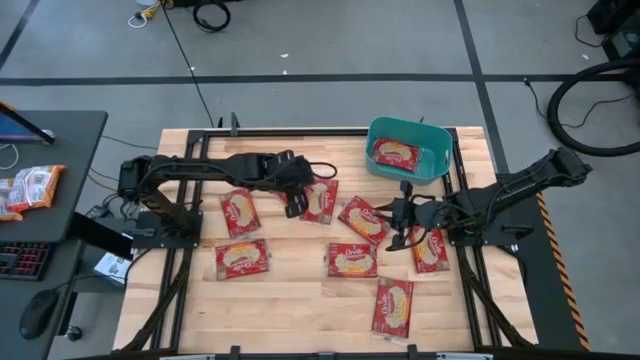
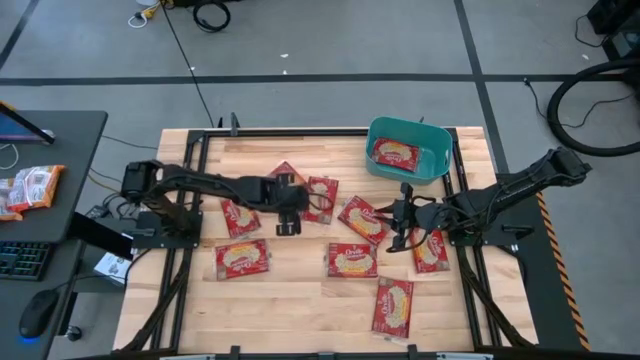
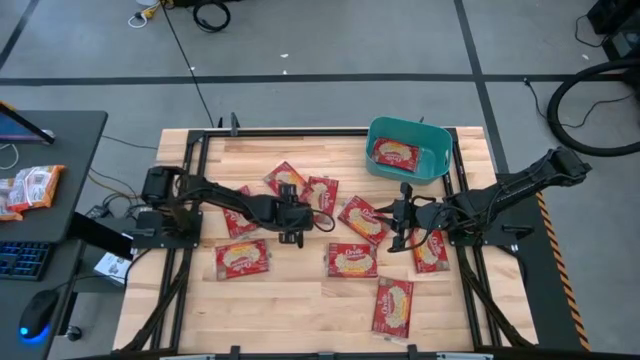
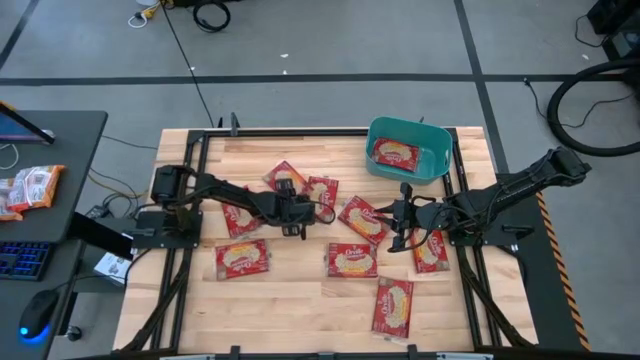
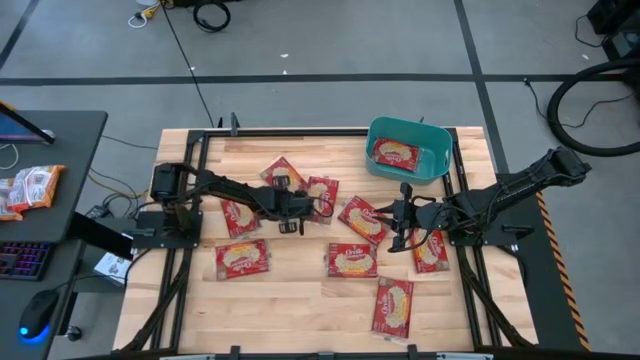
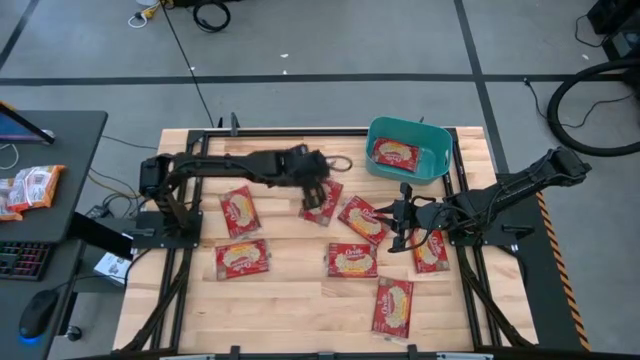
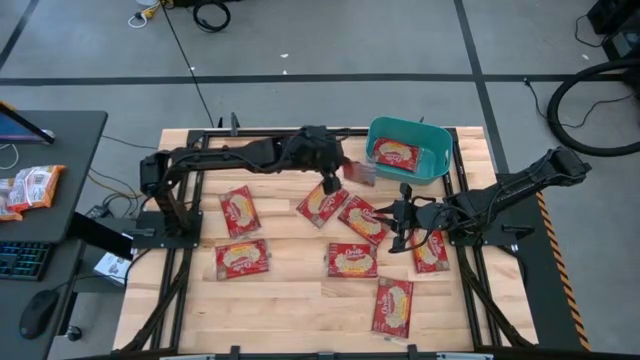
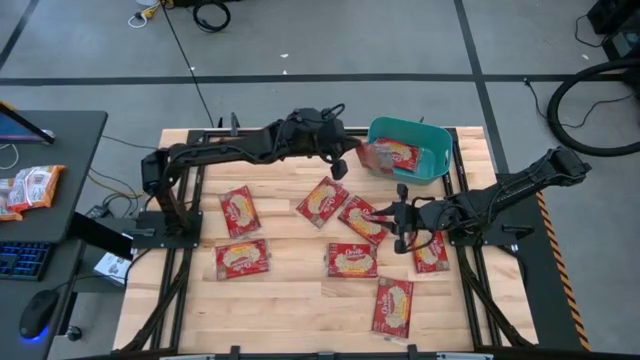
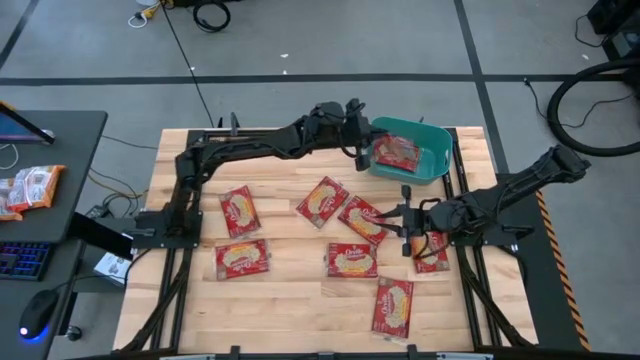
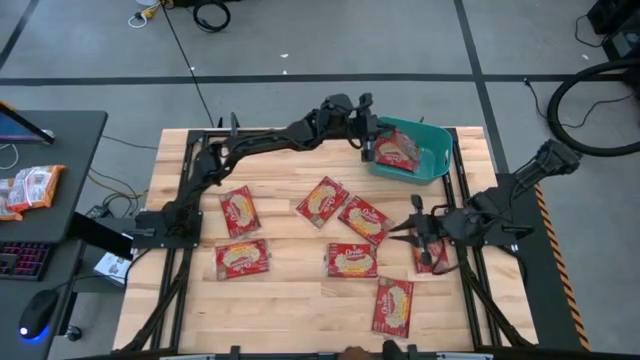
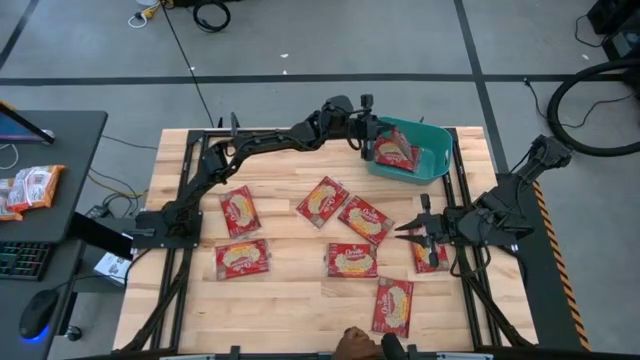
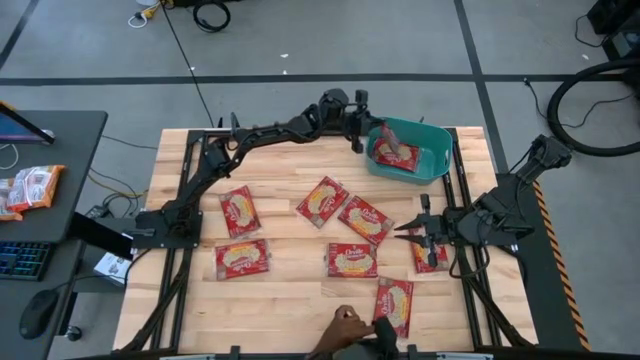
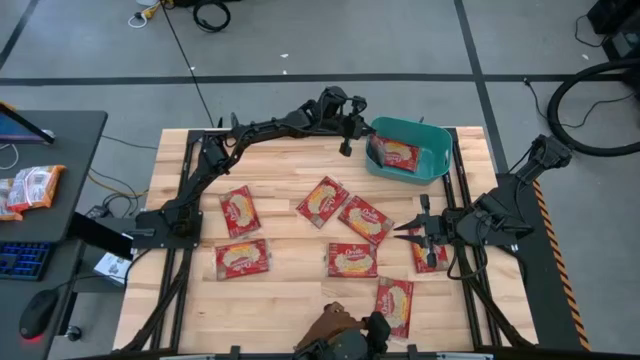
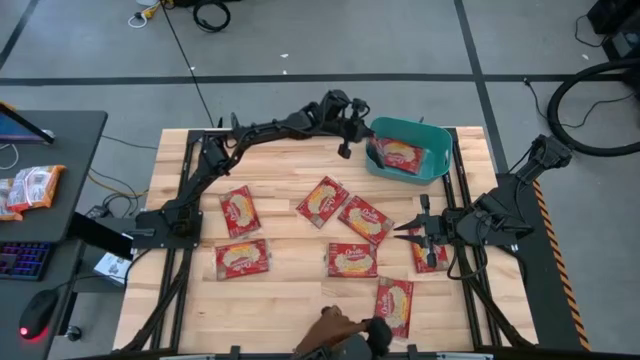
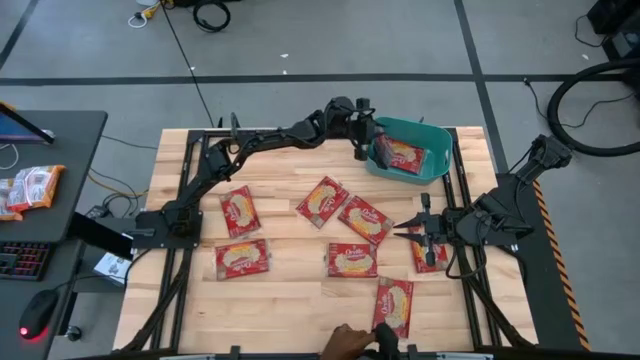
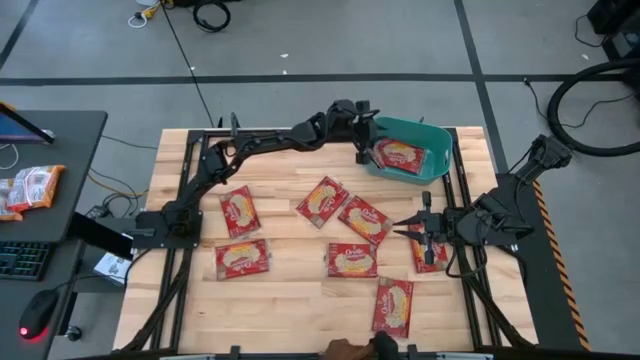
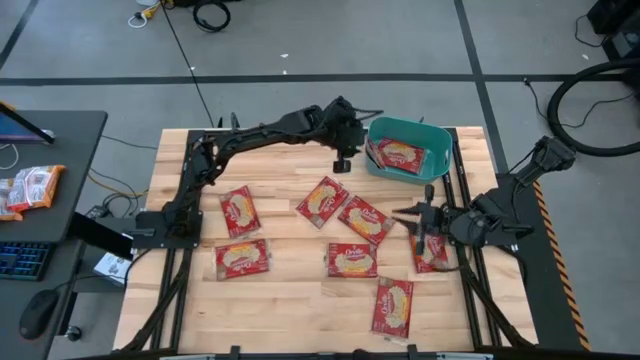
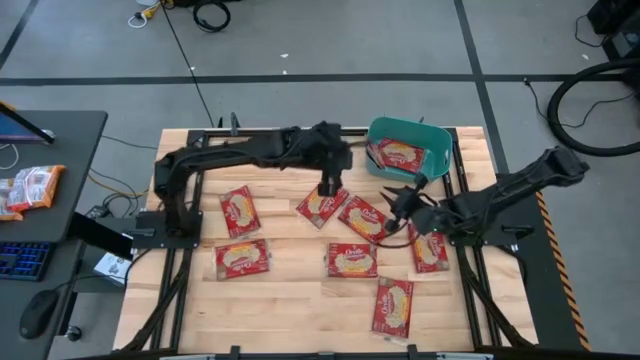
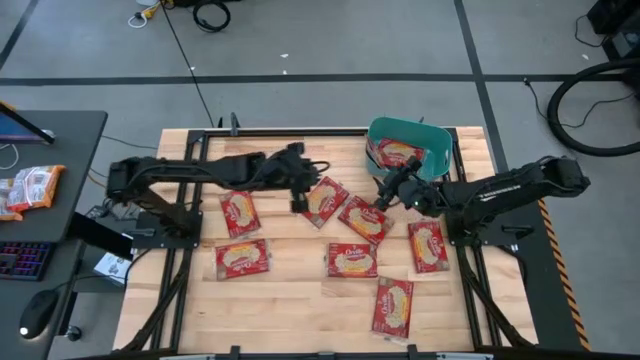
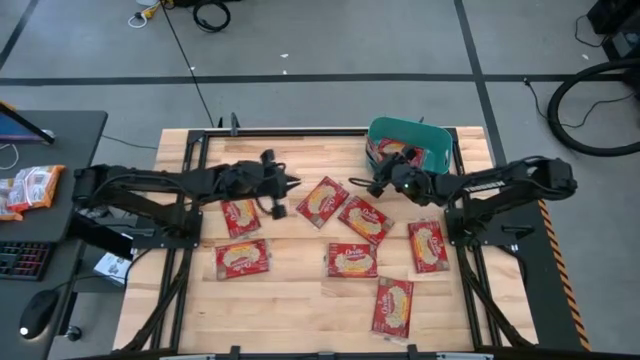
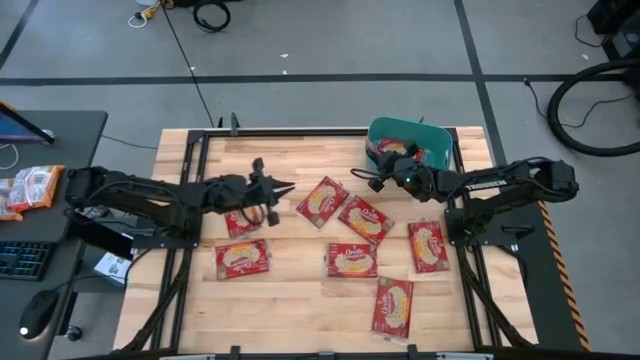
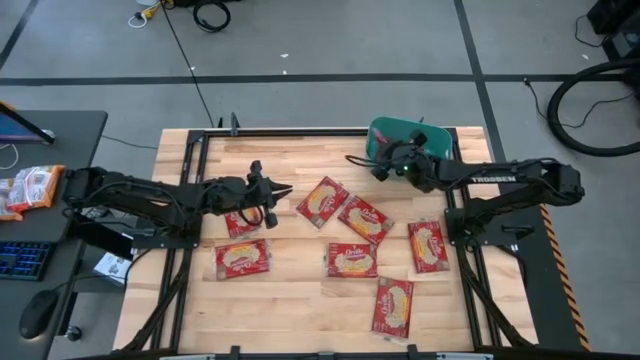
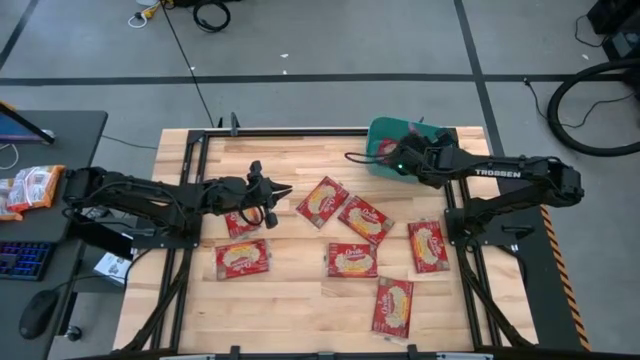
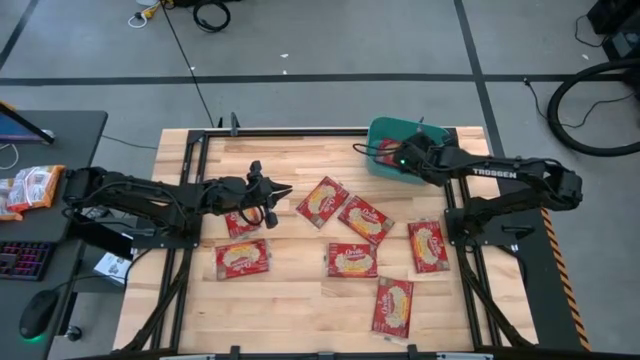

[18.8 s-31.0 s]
Task: Sort popcorn bags into baskets
Put the popcorn bag into the blue bin

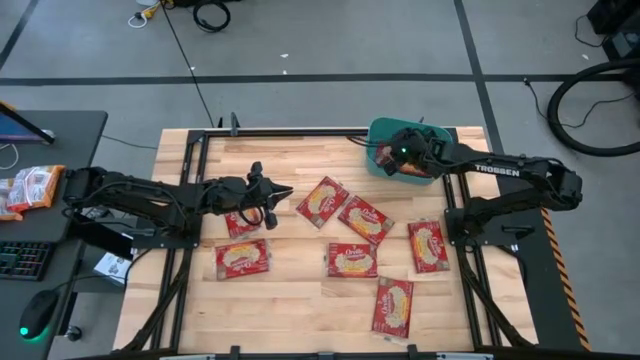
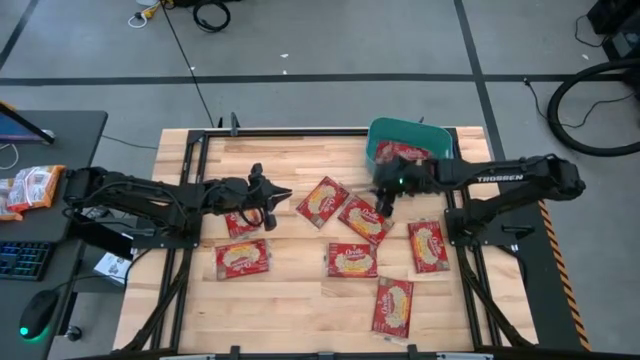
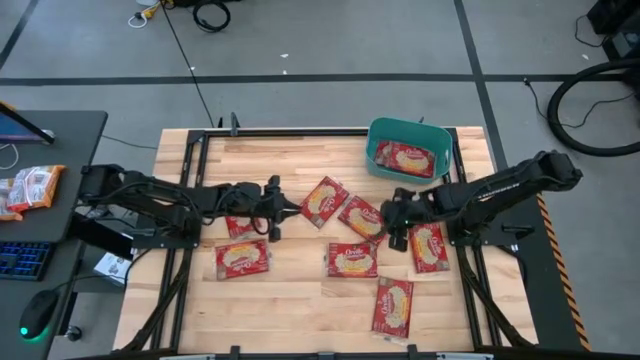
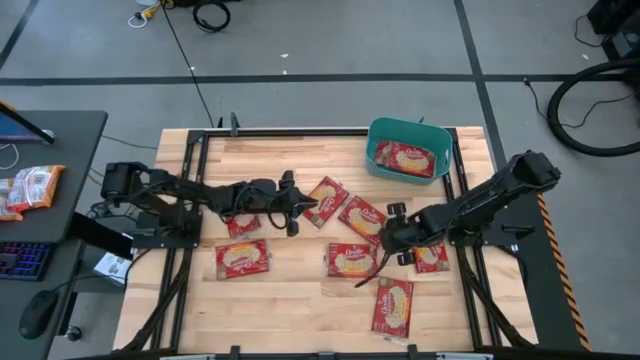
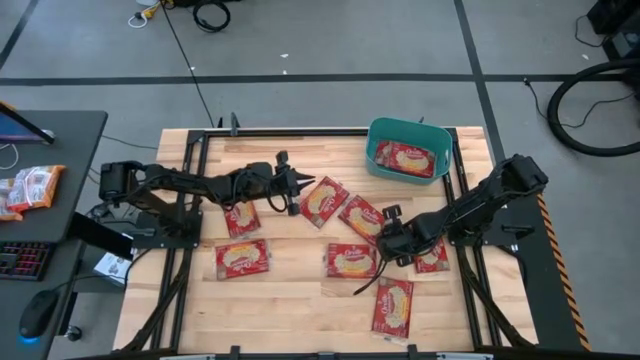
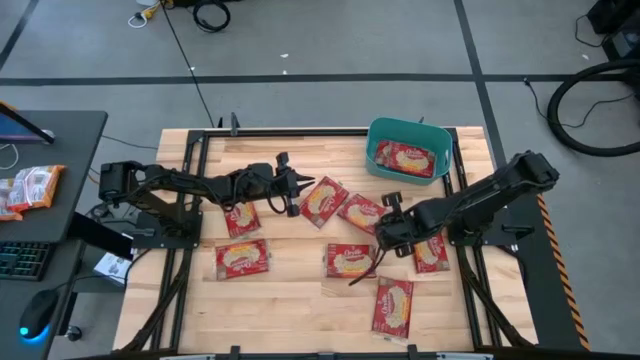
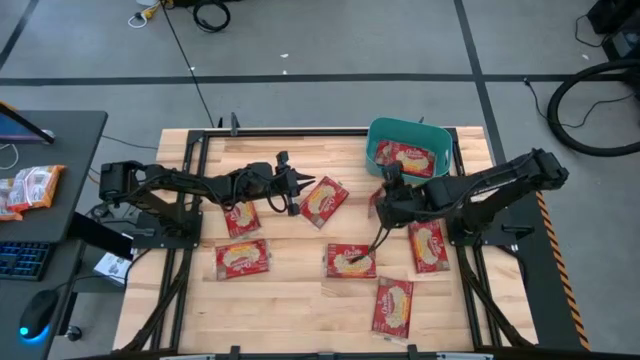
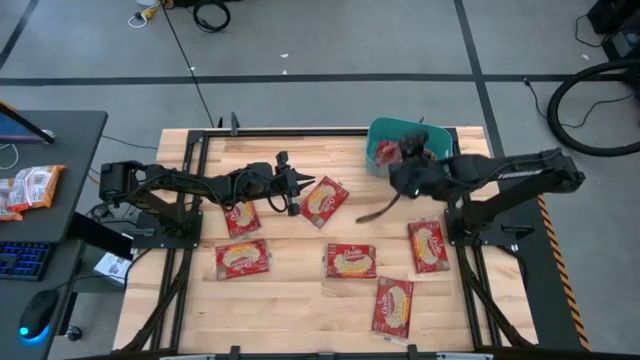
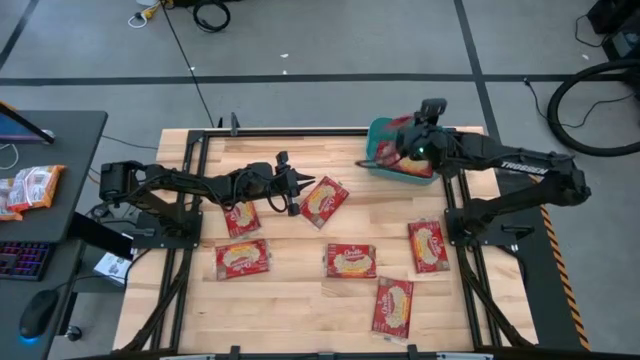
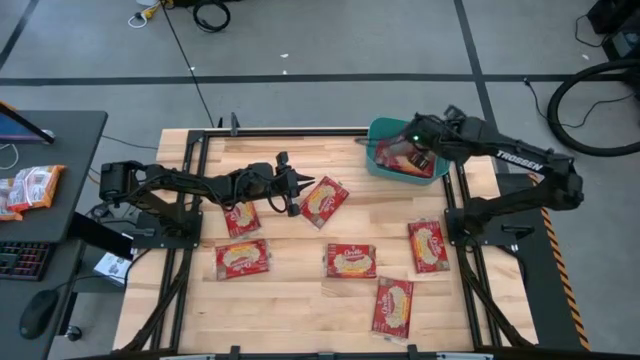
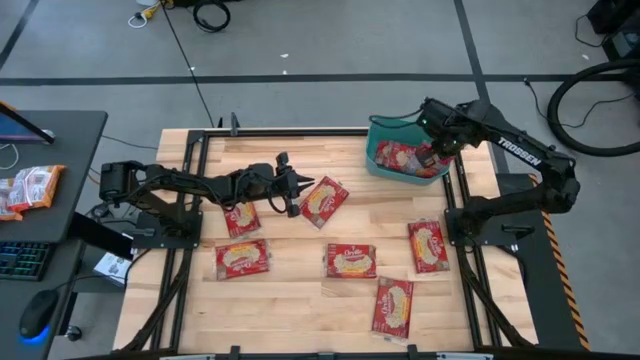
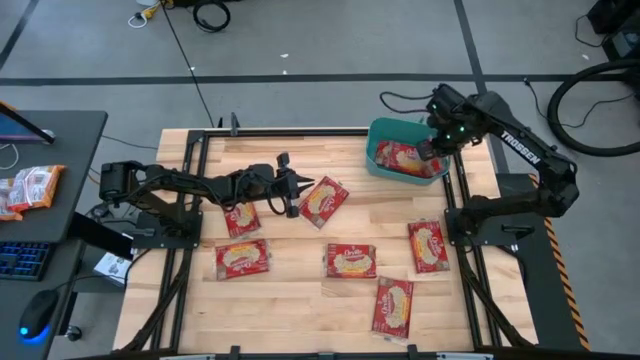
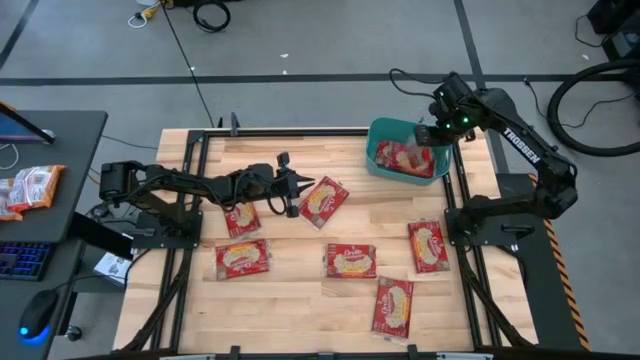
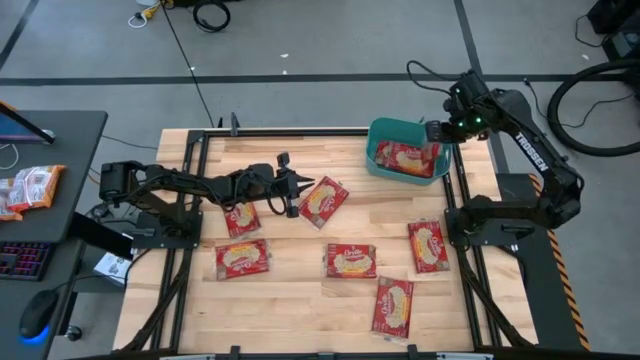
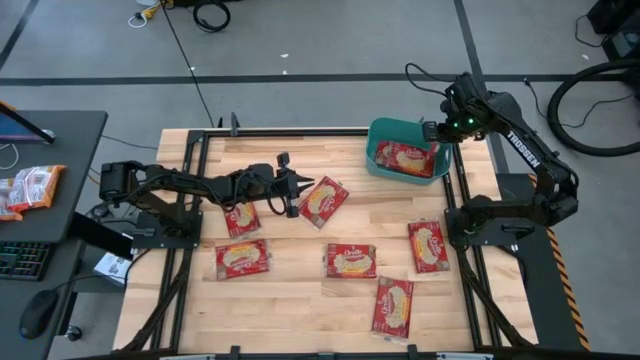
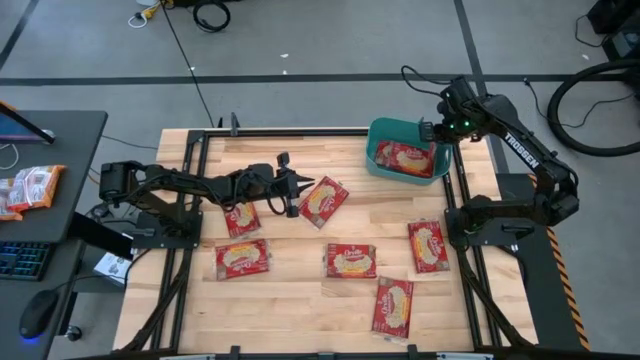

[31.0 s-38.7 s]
Put the popcorn bag into the blue bin

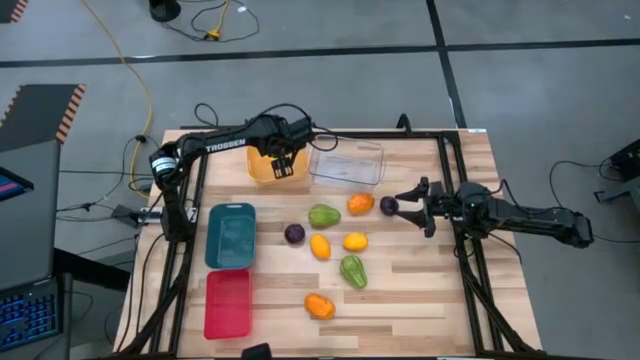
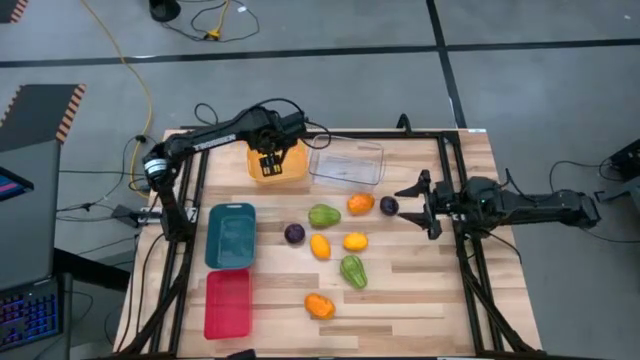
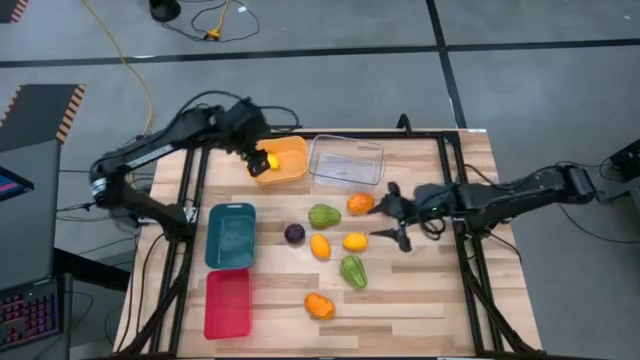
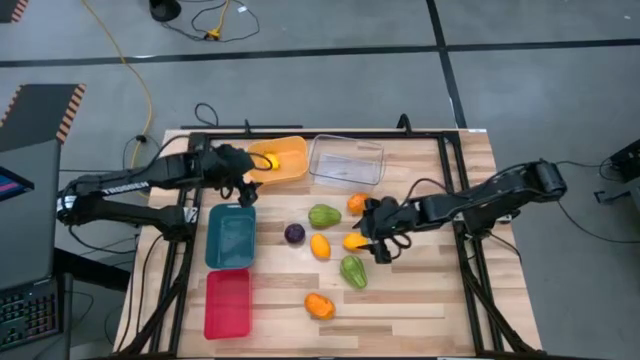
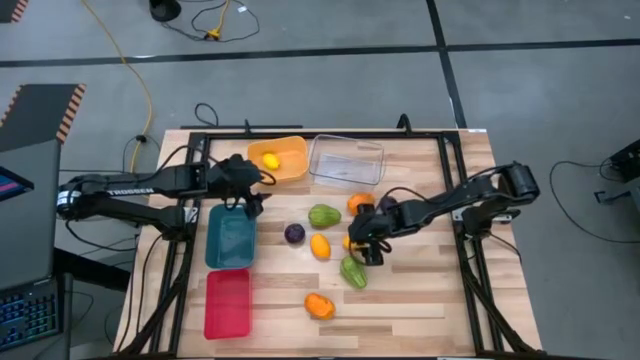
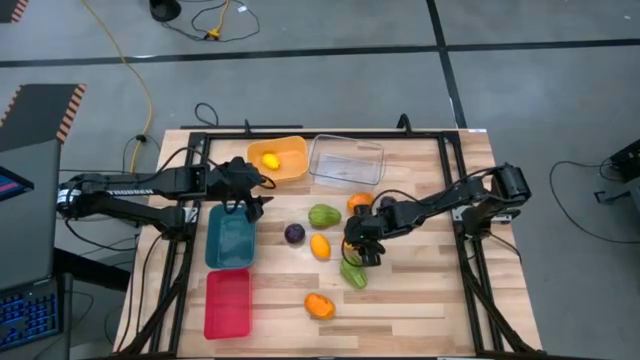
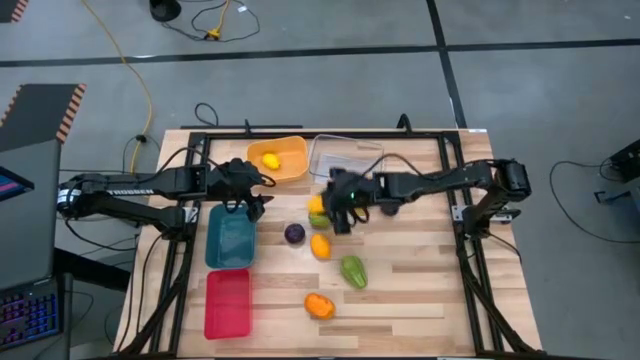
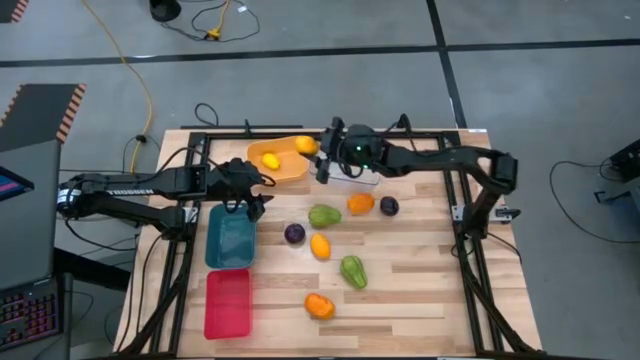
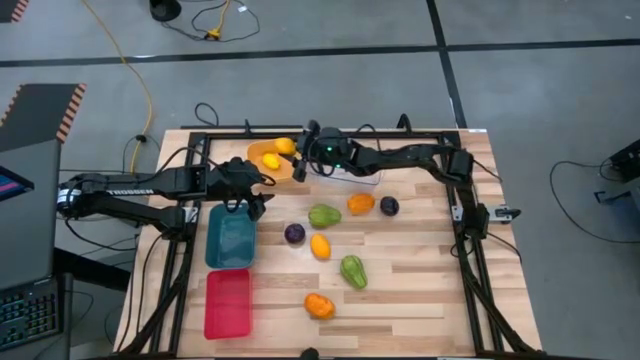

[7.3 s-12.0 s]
Task: Sort produce into baskets
Put the right yellow lemon into the yellow bin
